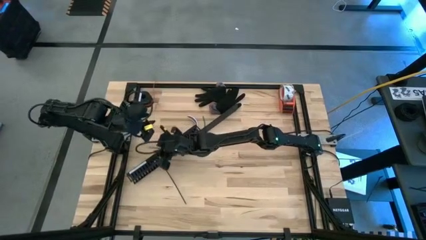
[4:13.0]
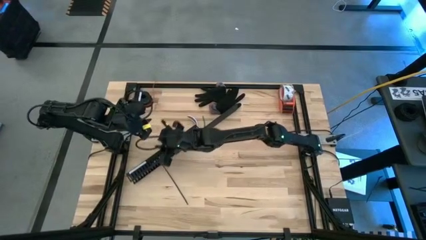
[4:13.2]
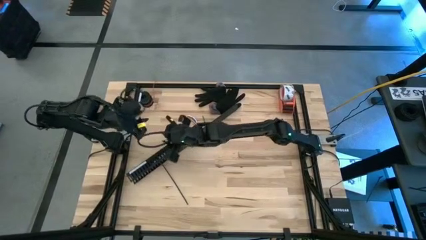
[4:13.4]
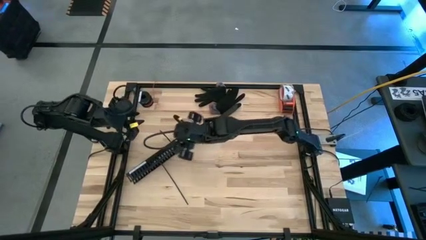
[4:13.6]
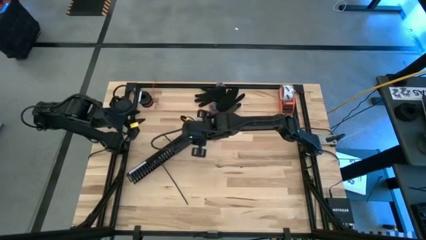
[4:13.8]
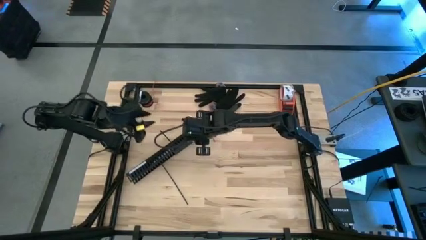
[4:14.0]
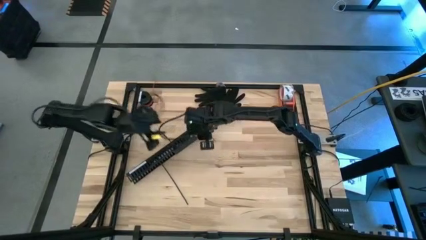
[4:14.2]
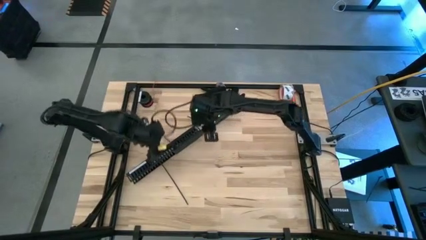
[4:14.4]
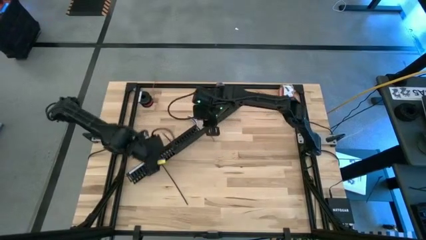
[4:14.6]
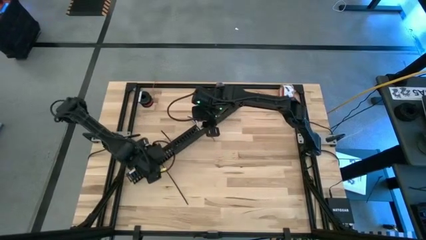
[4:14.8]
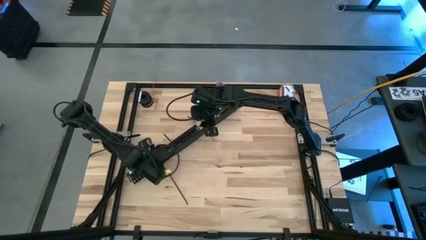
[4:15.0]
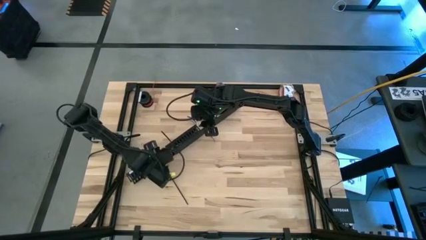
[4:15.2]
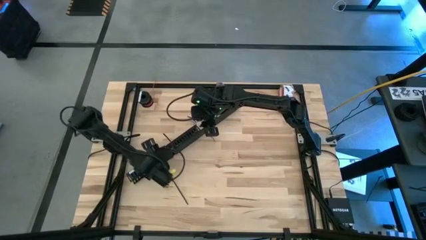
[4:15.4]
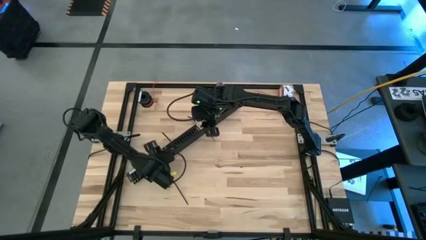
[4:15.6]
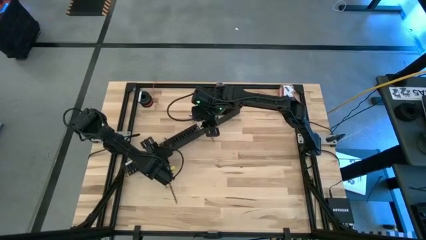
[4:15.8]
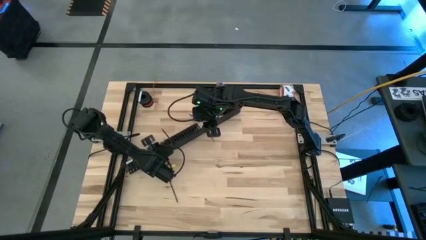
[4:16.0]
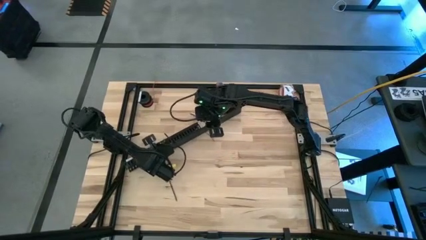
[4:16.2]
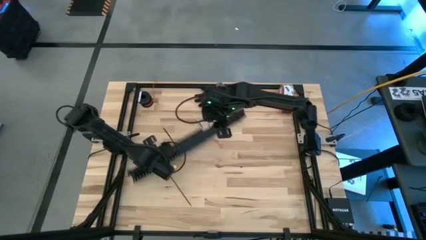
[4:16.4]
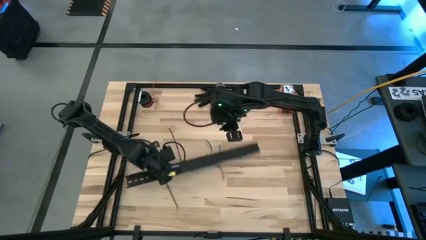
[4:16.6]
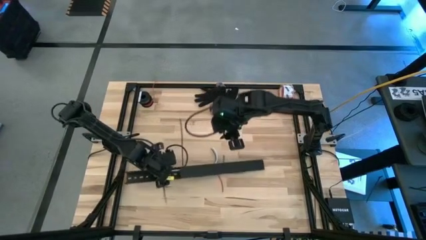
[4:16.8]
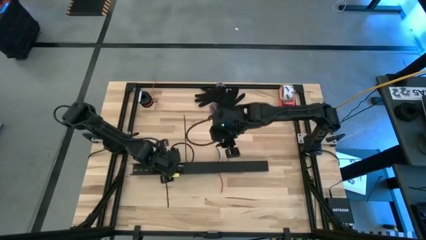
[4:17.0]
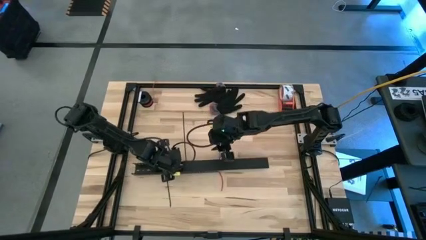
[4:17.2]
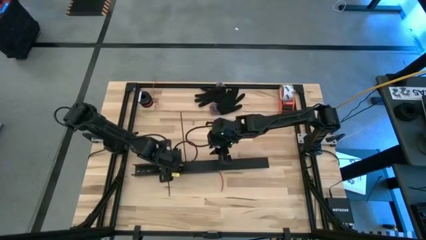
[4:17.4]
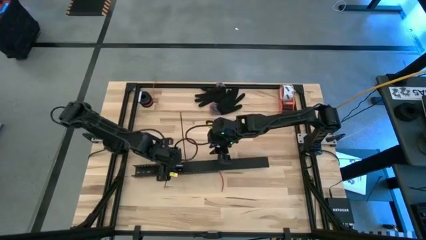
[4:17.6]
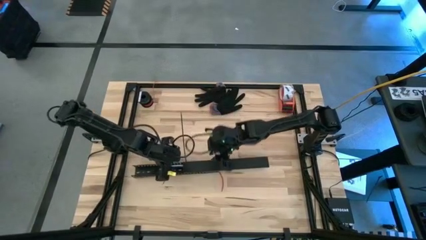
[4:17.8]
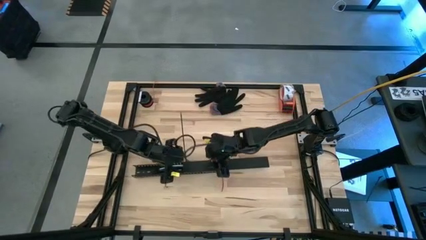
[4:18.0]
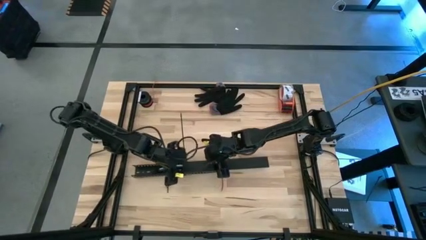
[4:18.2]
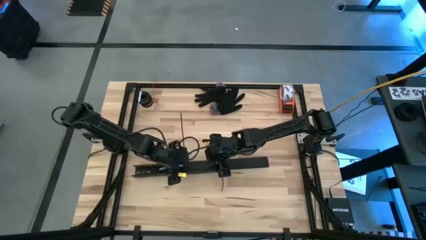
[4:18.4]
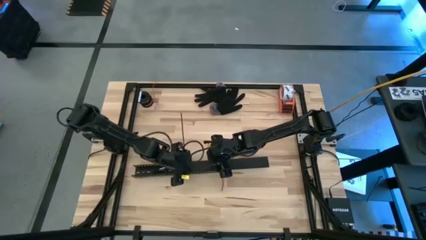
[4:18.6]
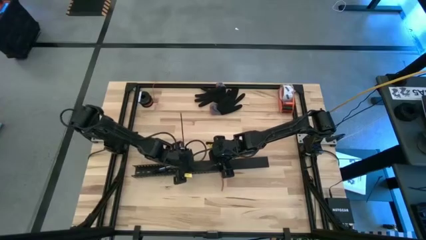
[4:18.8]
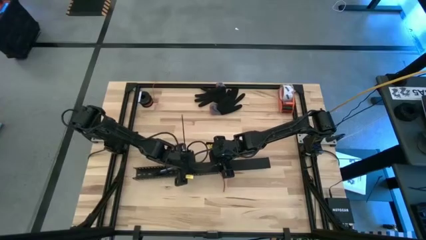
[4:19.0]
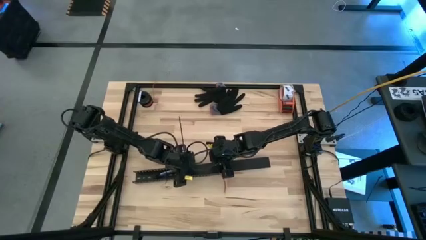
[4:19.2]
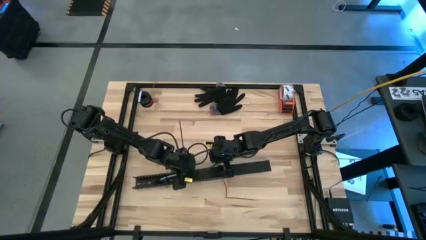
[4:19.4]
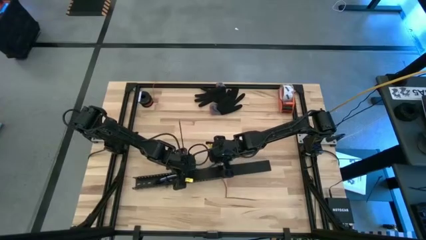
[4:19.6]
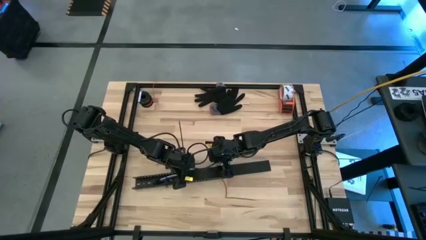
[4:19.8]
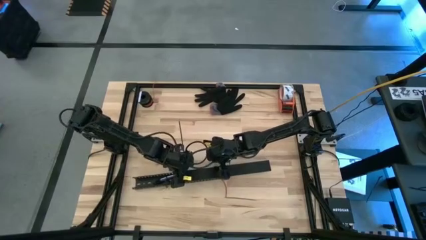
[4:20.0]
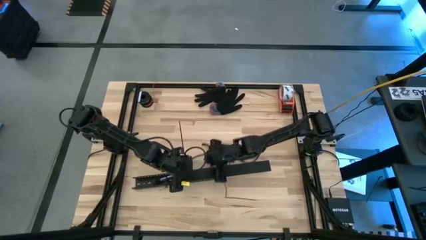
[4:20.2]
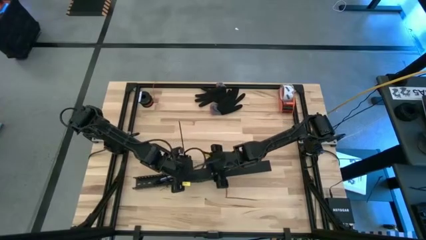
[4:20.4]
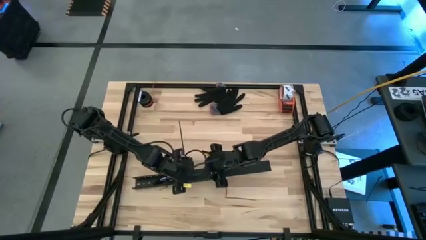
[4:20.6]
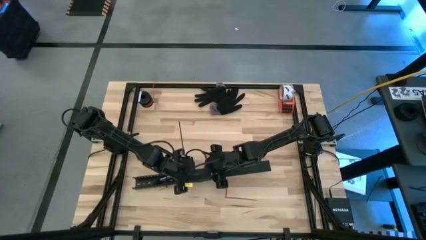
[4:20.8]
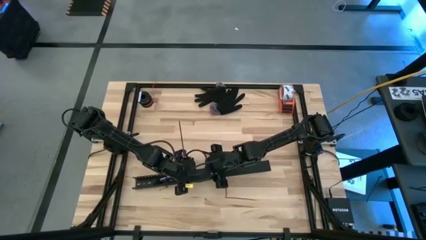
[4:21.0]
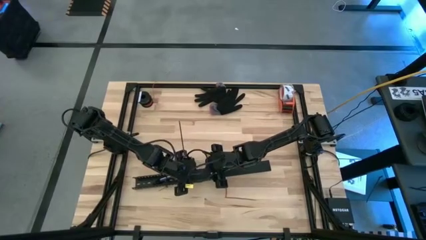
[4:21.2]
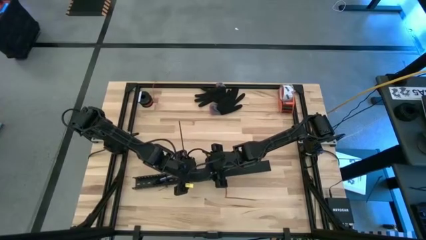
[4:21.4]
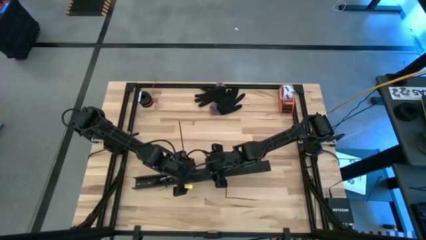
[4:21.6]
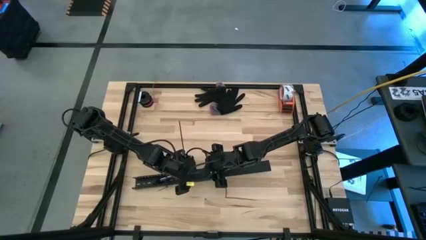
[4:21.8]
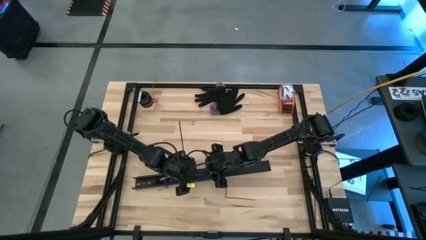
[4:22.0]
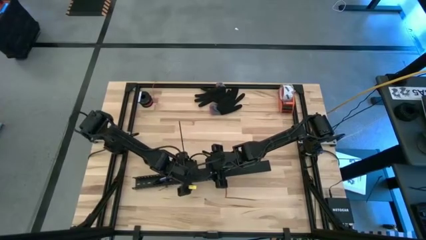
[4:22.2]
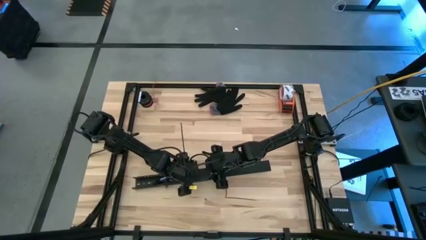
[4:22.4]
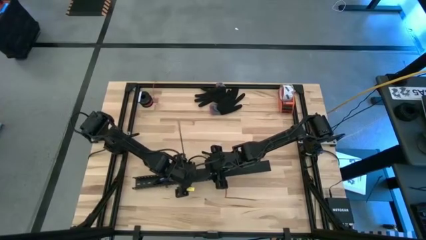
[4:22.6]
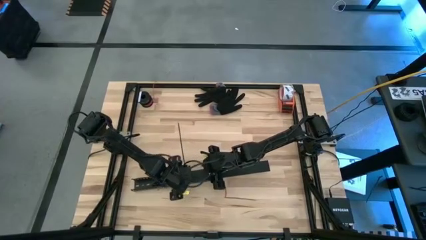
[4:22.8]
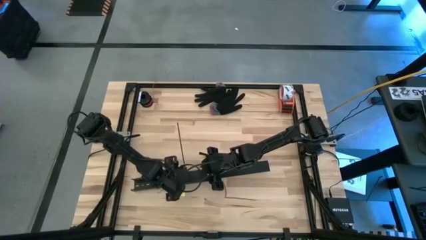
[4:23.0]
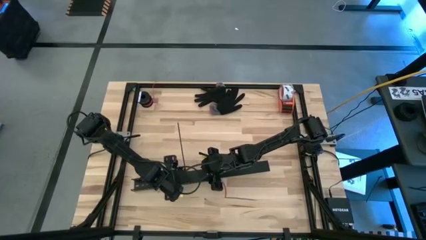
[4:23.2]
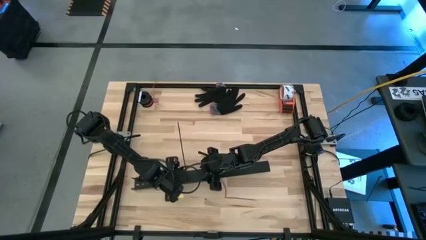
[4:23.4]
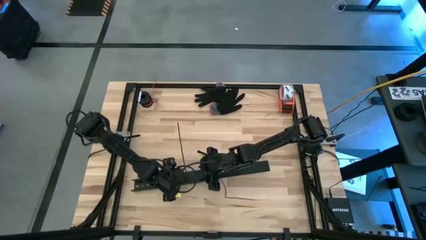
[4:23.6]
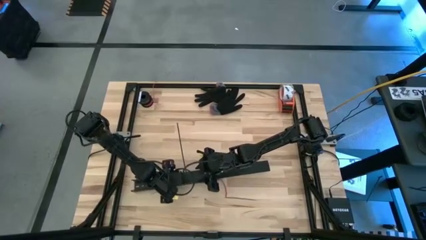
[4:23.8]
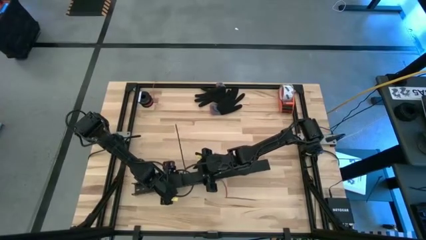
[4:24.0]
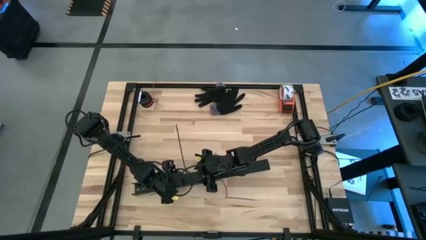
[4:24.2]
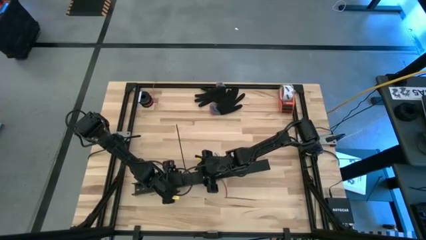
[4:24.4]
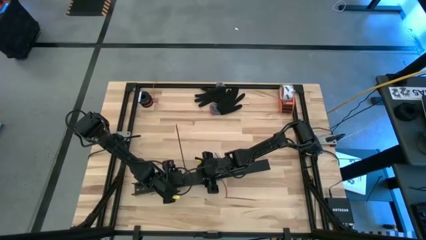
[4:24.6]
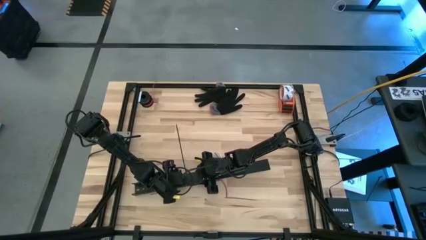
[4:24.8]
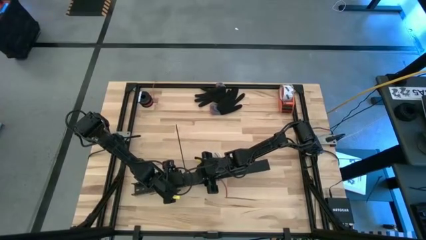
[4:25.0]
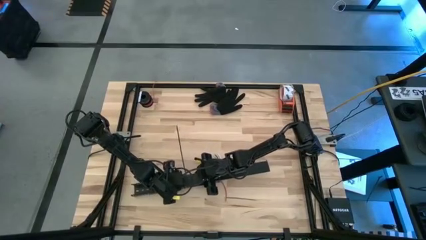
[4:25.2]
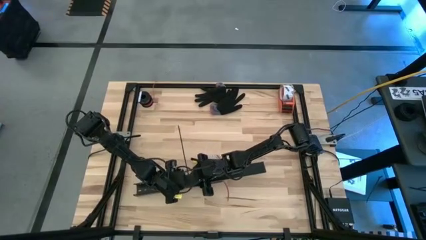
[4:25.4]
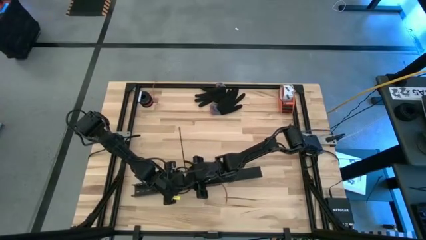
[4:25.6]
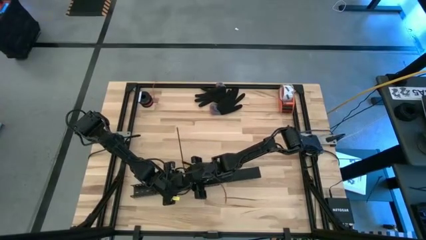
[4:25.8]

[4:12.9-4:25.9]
Task: Ziptie cables
Close the black cable duct lid
